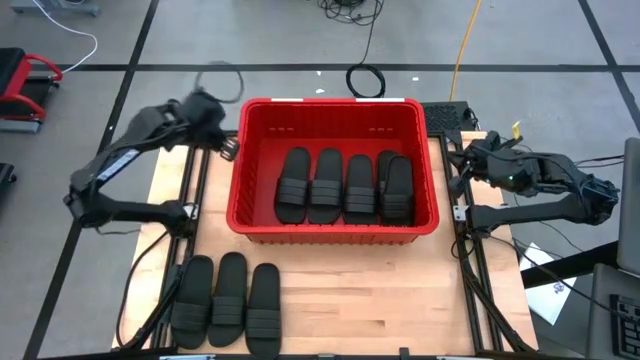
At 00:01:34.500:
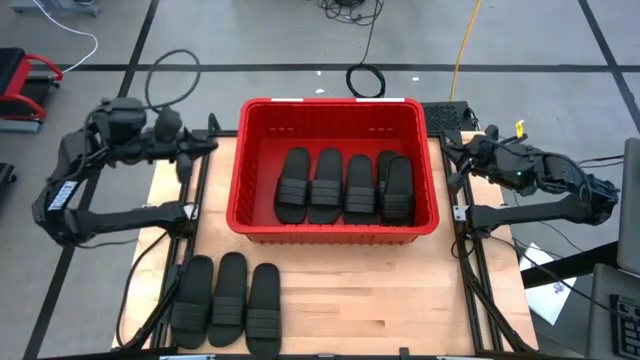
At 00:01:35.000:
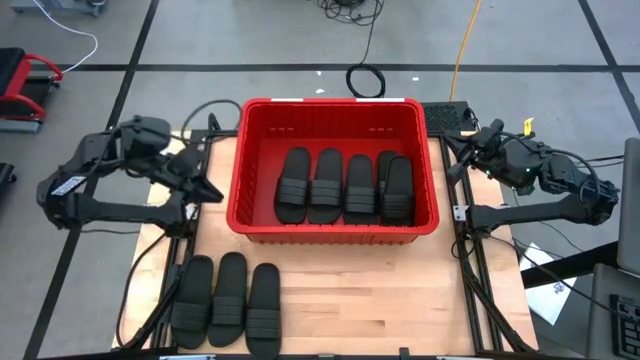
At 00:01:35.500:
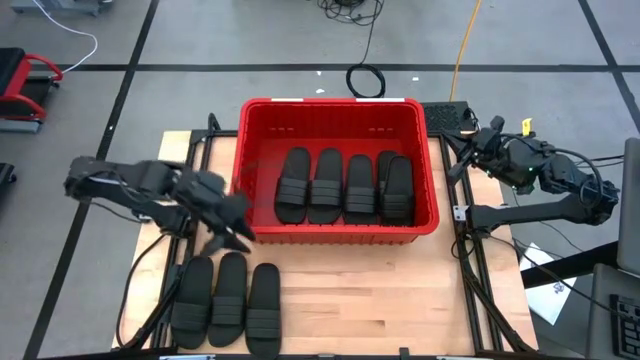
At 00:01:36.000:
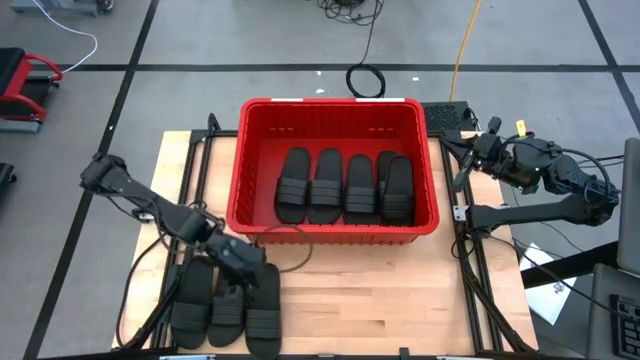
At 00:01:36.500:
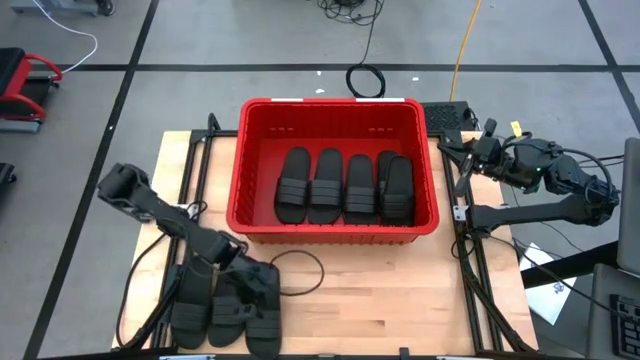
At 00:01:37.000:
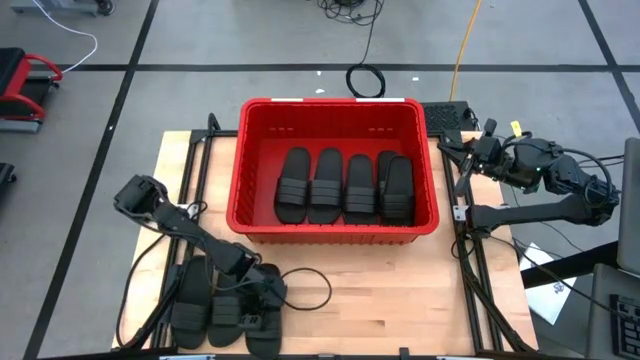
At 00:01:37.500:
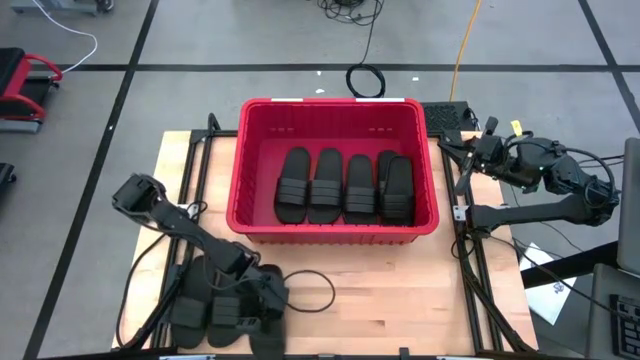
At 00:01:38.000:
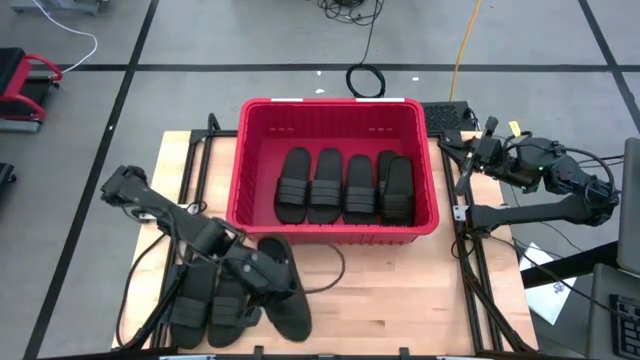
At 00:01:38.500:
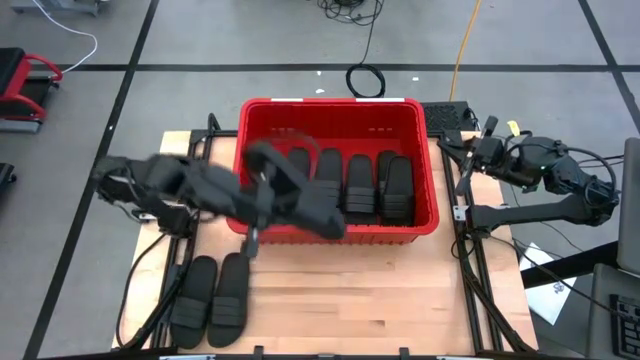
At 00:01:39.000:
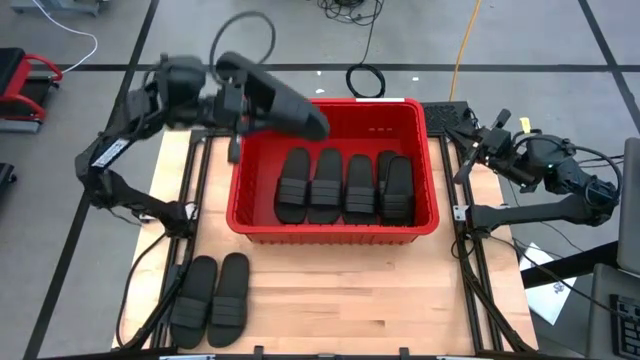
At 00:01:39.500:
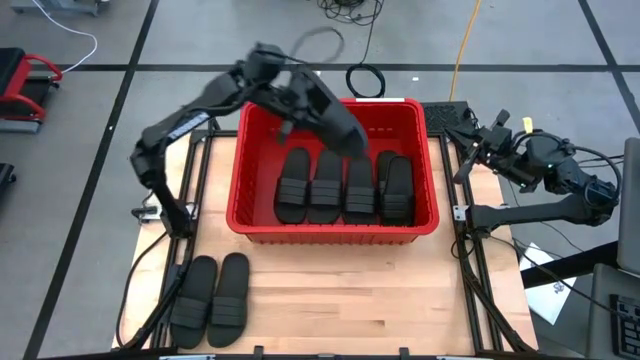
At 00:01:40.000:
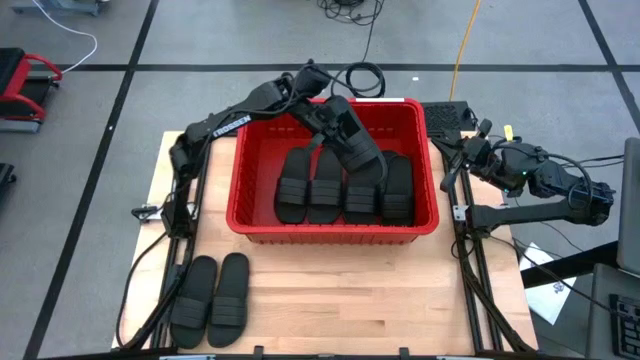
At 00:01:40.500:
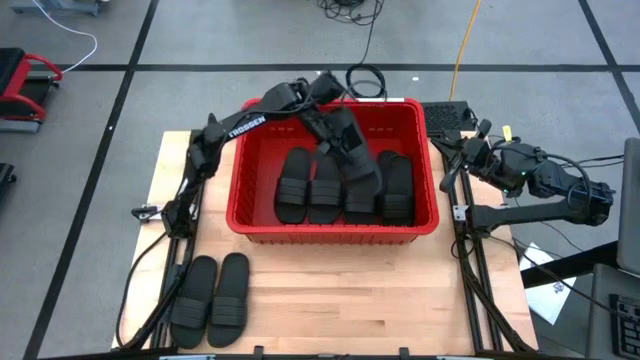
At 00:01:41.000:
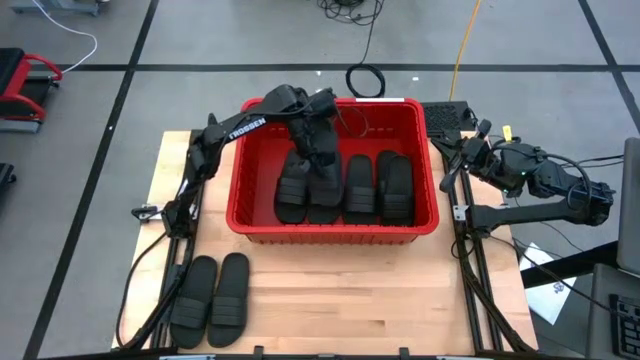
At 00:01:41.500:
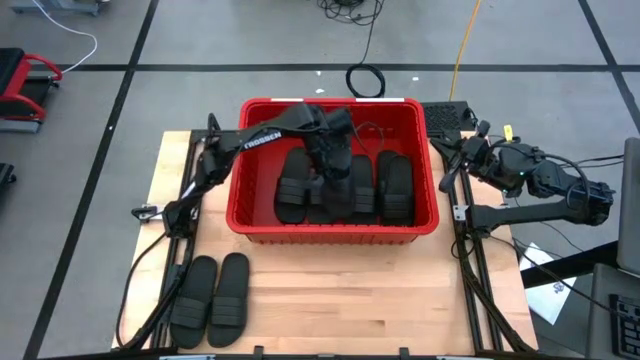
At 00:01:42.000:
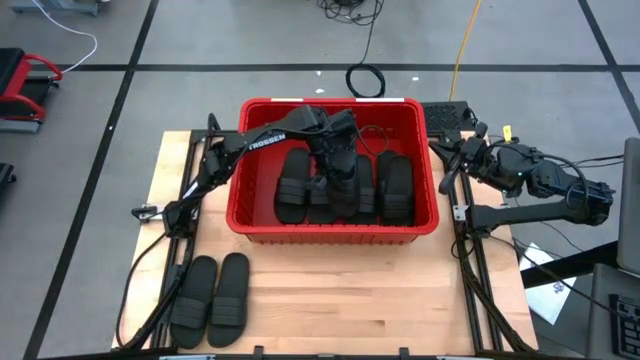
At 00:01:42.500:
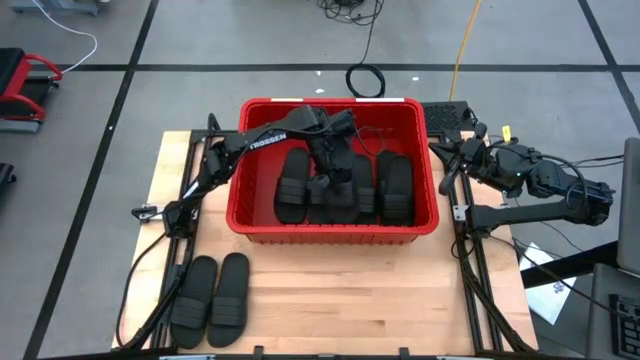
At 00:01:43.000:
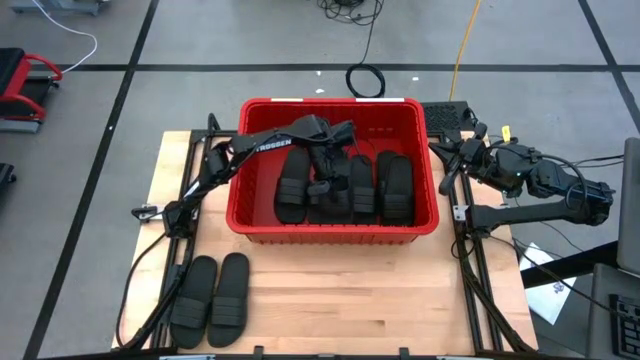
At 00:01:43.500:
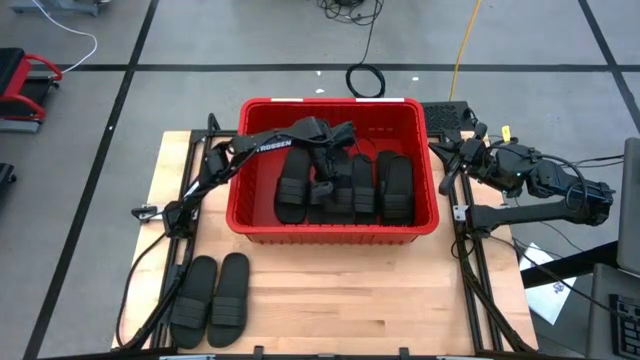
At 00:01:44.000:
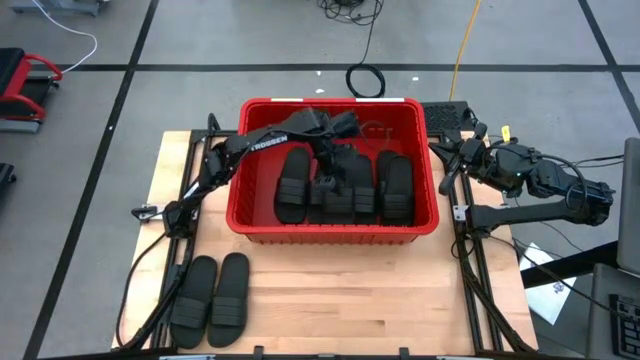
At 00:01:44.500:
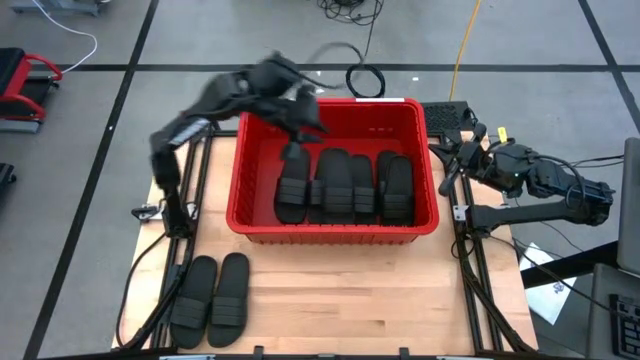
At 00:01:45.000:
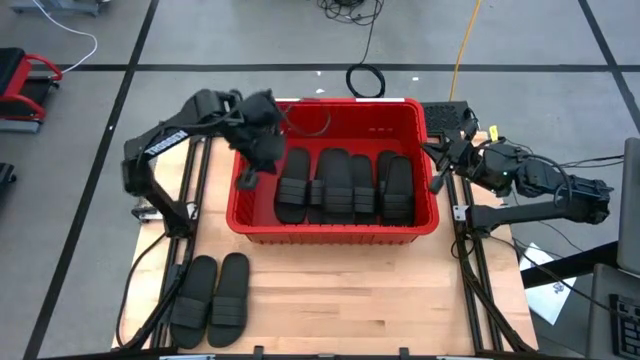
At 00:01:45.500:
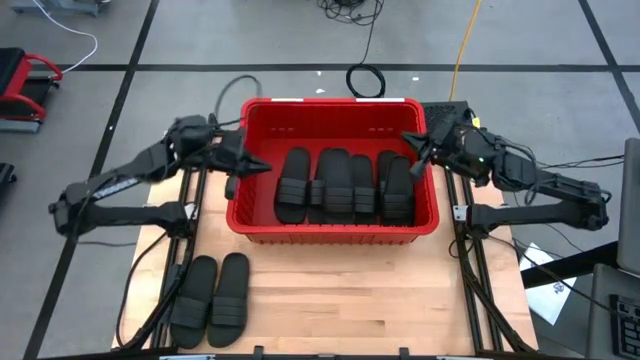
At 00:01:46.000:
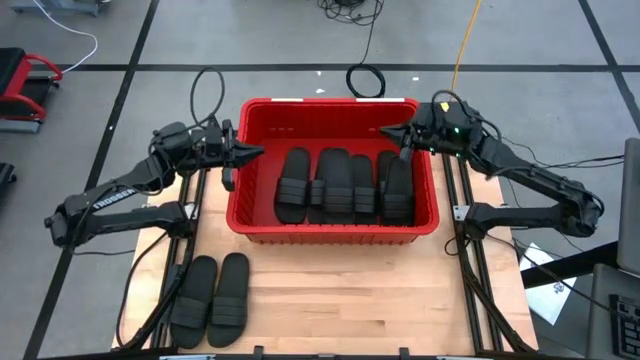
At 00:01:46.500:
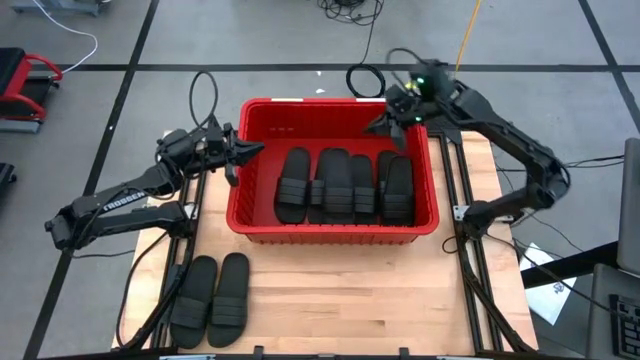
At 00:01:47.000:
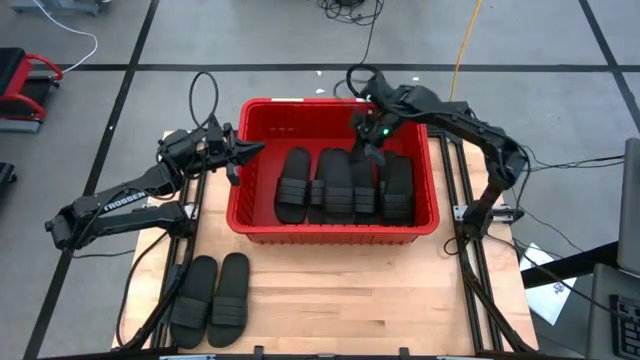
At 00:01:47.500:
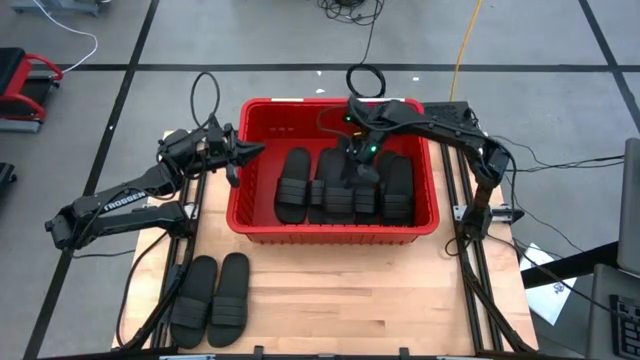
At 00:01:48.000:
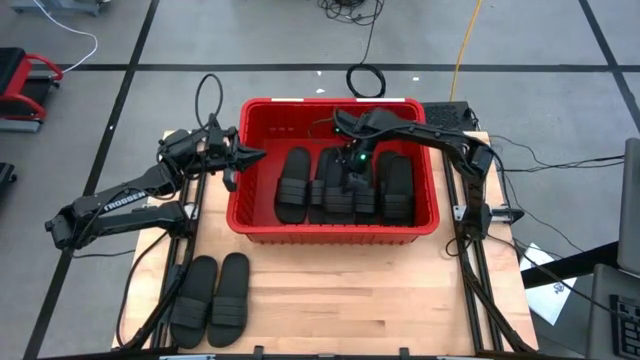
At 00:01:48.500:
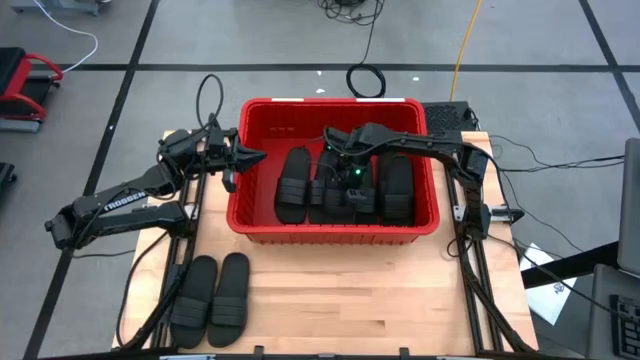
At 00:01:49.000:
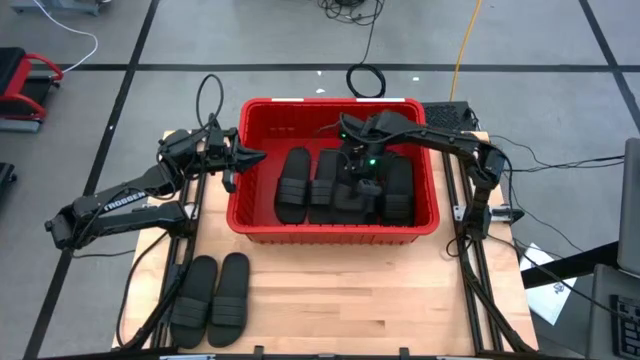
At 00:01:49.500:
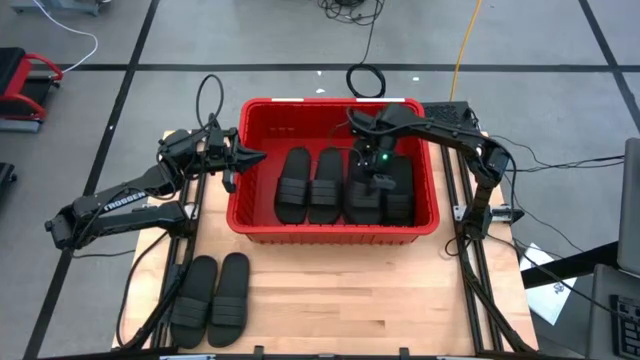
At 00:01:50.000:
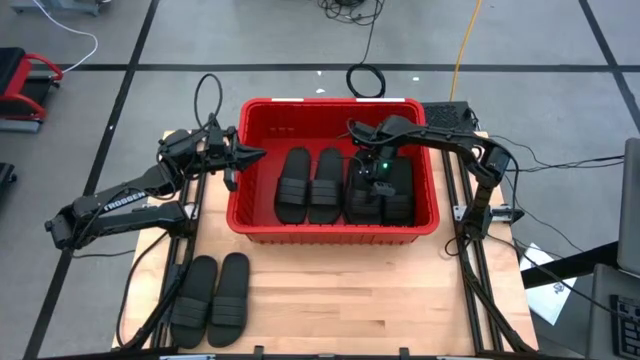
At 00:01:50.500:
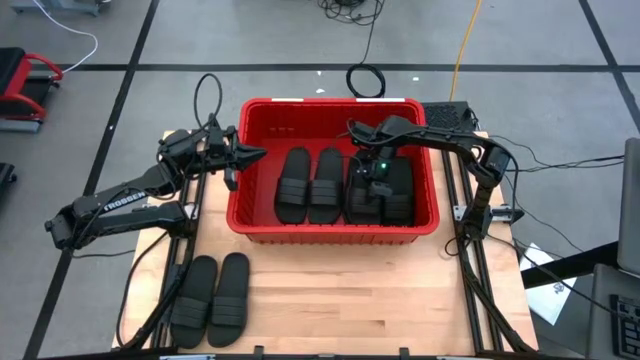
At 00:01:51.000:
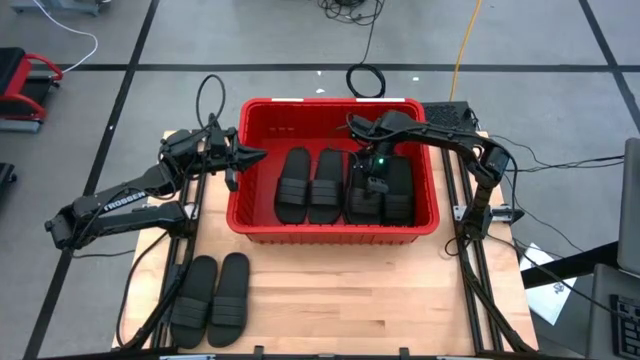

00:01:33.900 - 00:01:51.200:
Task: Pick and place slides into bin
Put the black slide into the red bin
